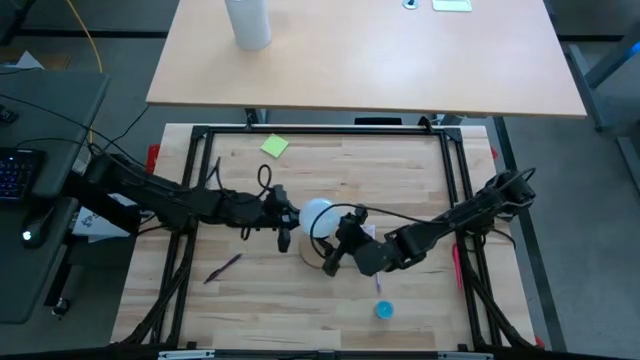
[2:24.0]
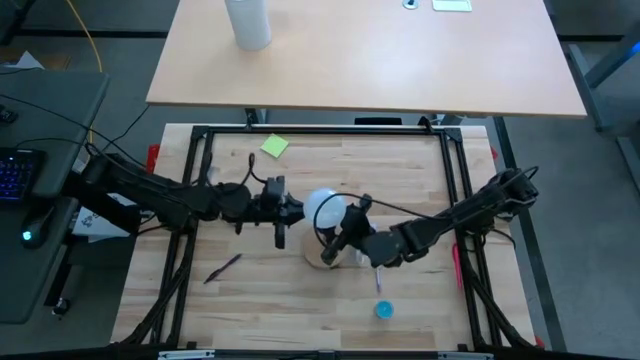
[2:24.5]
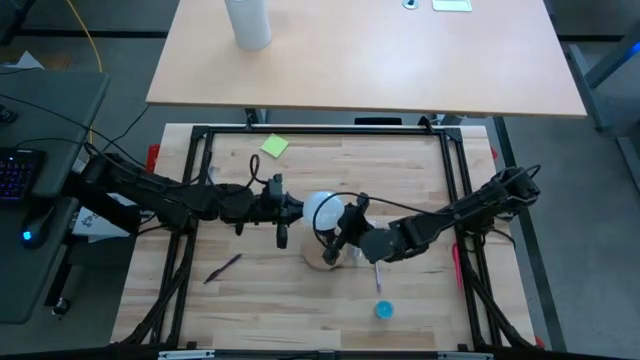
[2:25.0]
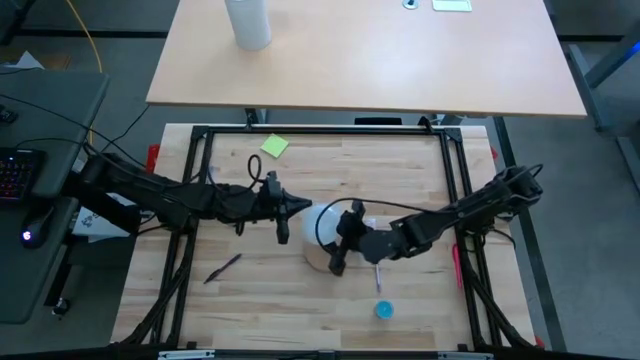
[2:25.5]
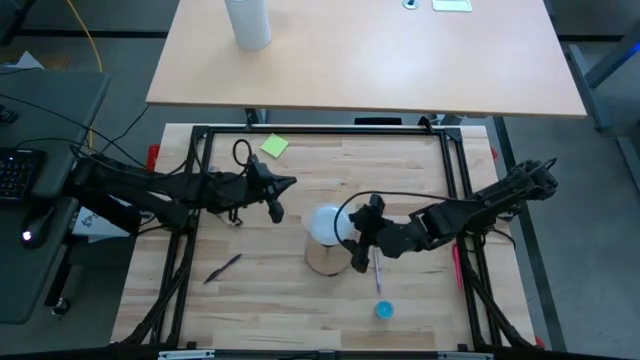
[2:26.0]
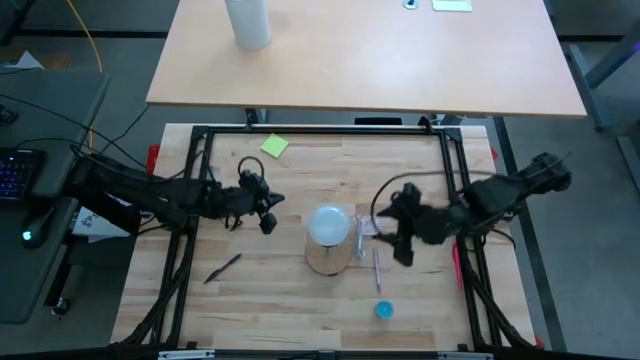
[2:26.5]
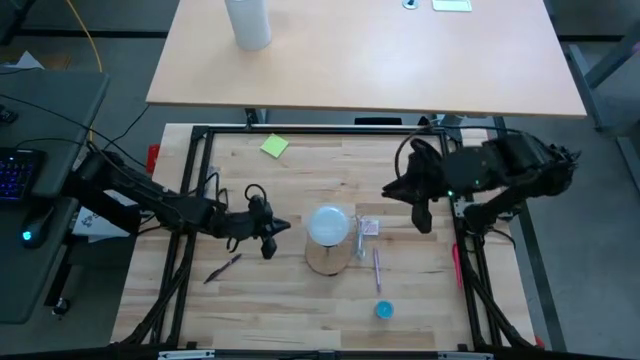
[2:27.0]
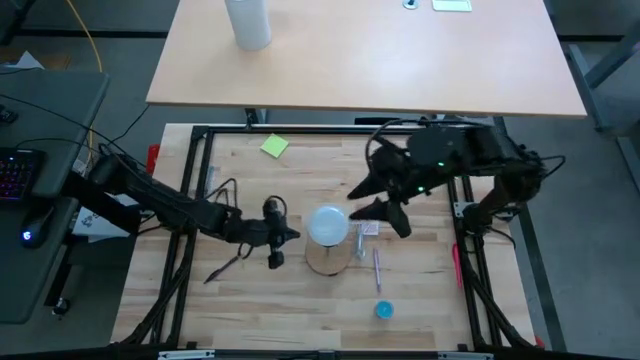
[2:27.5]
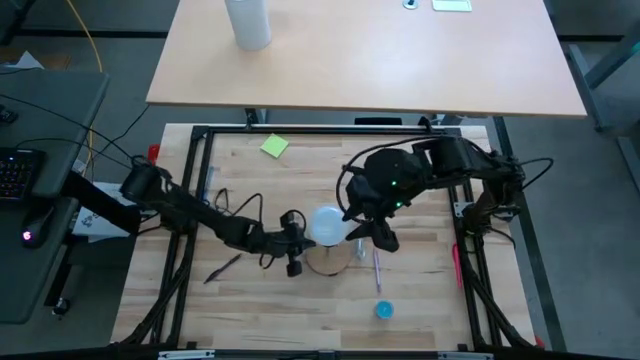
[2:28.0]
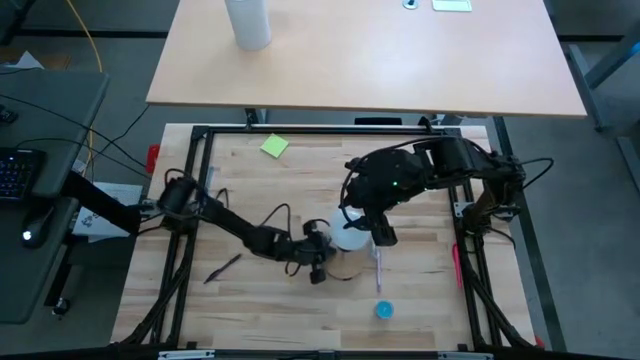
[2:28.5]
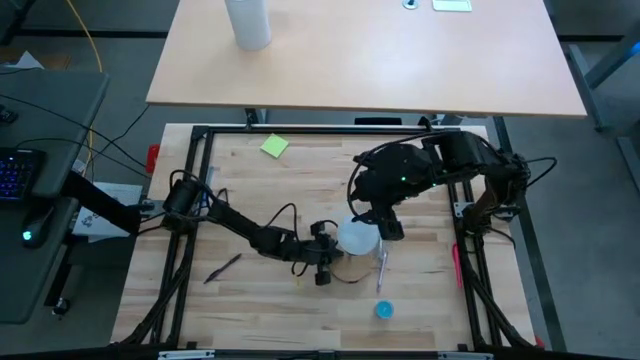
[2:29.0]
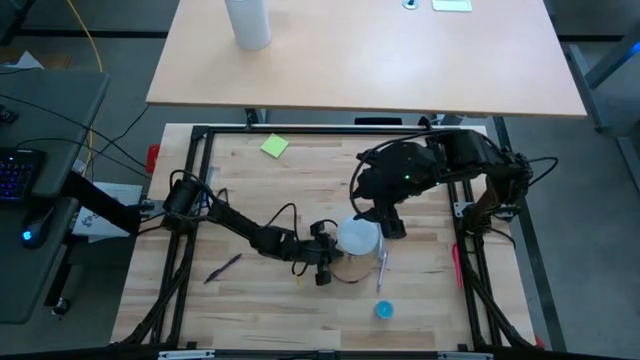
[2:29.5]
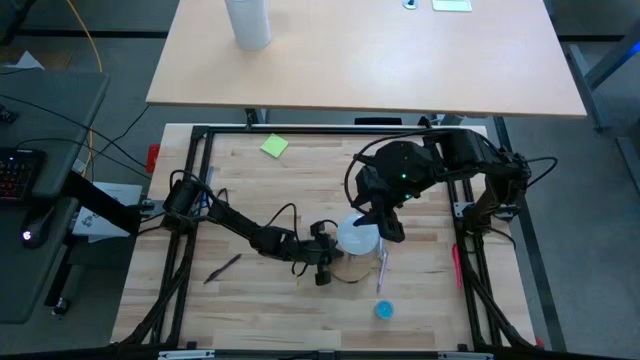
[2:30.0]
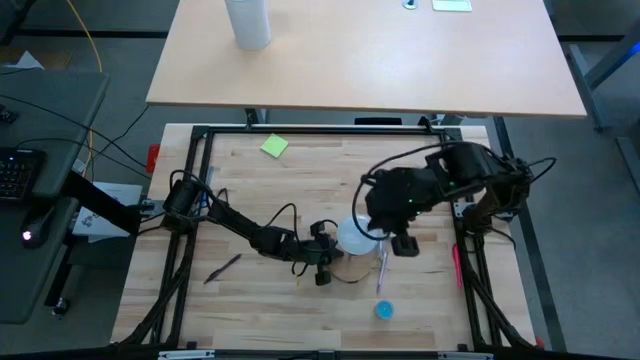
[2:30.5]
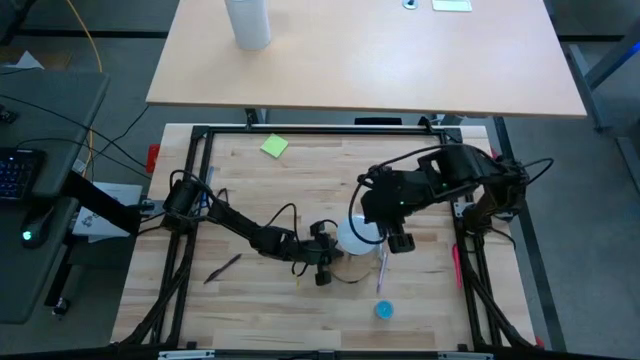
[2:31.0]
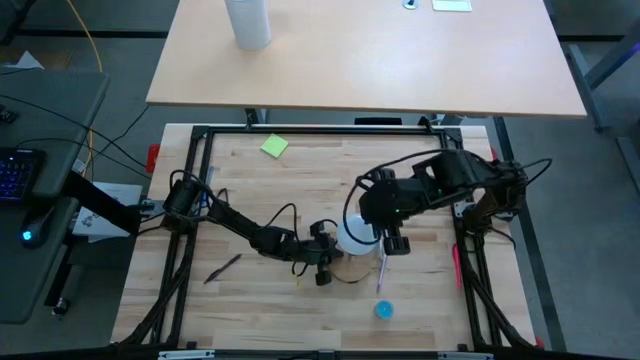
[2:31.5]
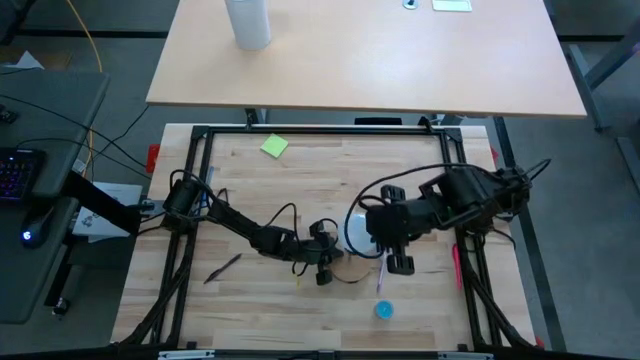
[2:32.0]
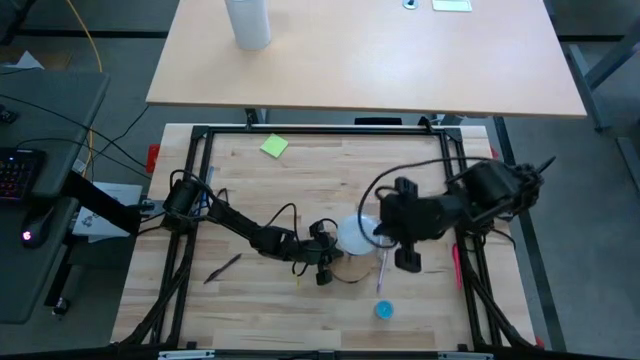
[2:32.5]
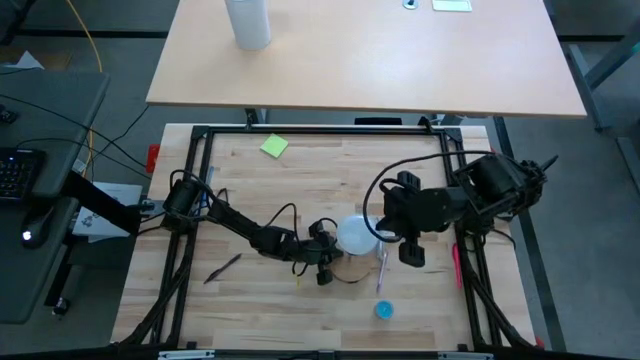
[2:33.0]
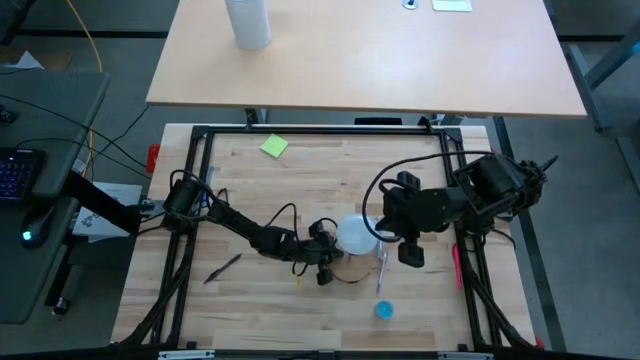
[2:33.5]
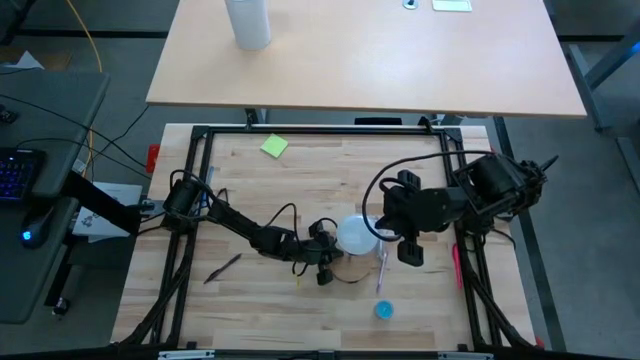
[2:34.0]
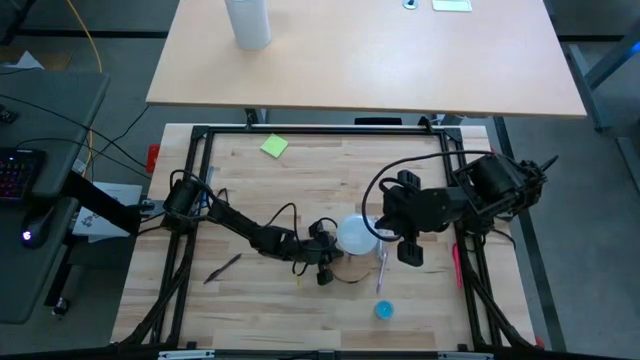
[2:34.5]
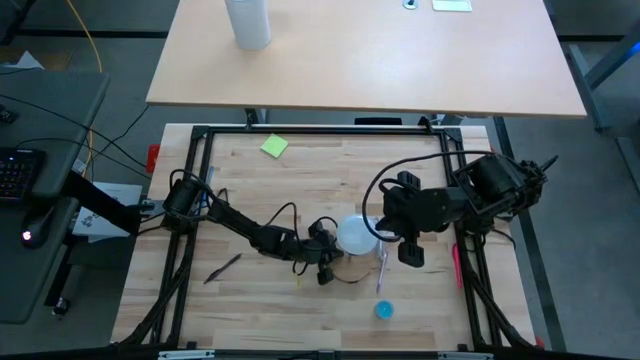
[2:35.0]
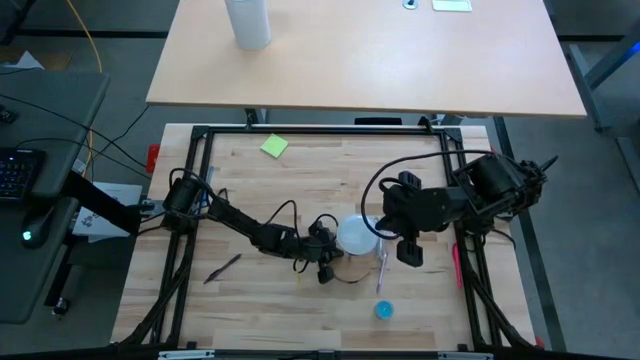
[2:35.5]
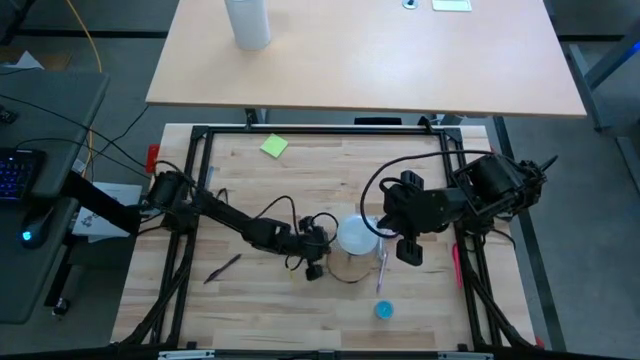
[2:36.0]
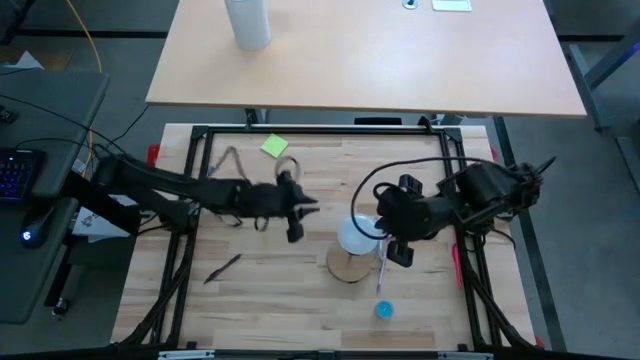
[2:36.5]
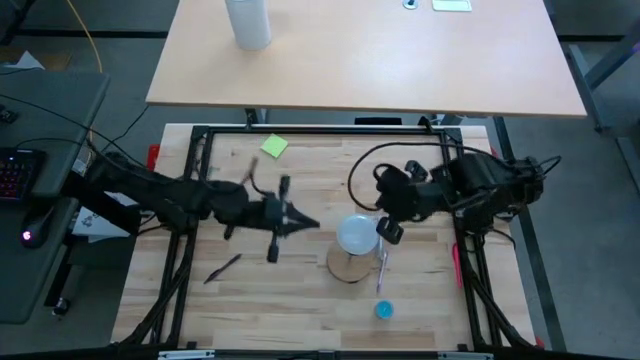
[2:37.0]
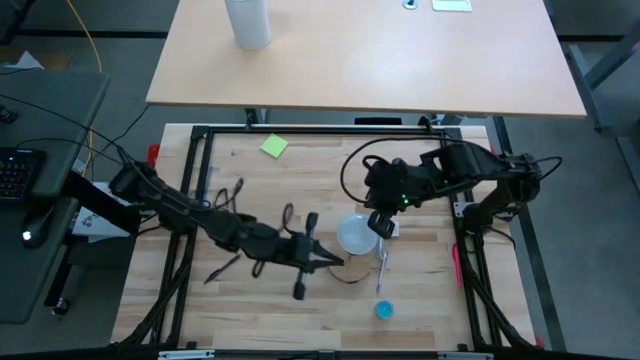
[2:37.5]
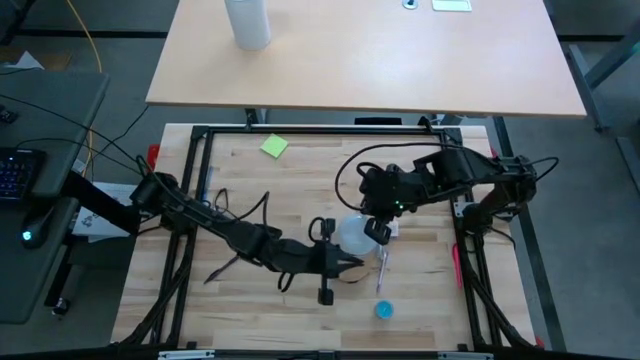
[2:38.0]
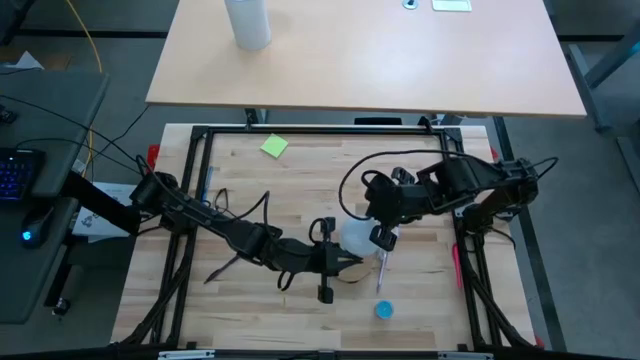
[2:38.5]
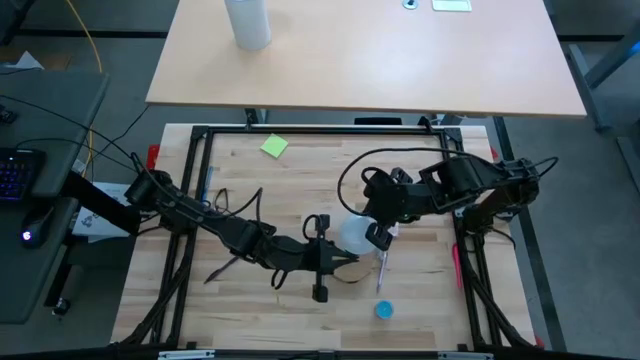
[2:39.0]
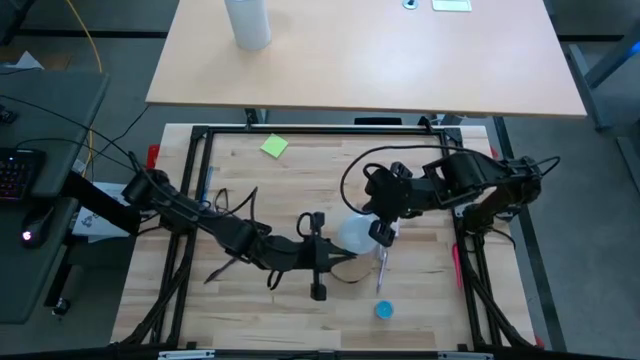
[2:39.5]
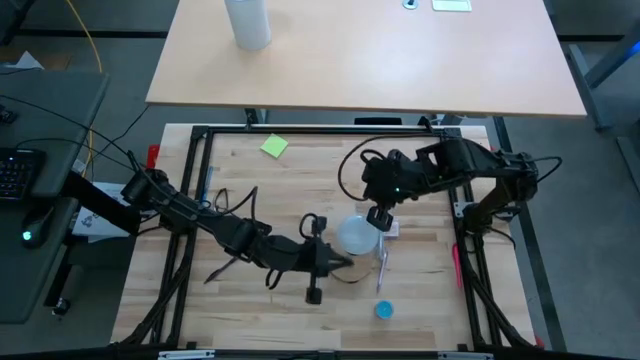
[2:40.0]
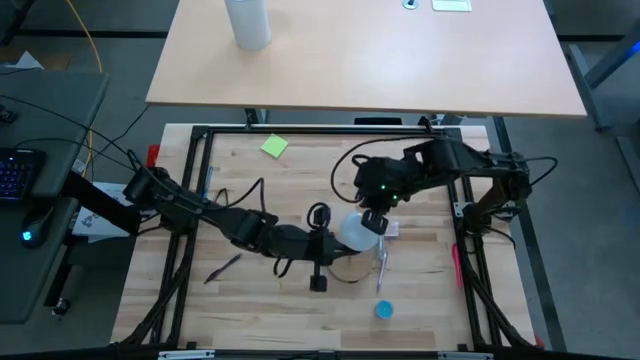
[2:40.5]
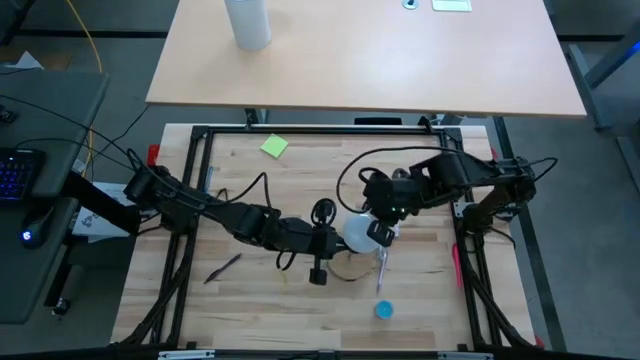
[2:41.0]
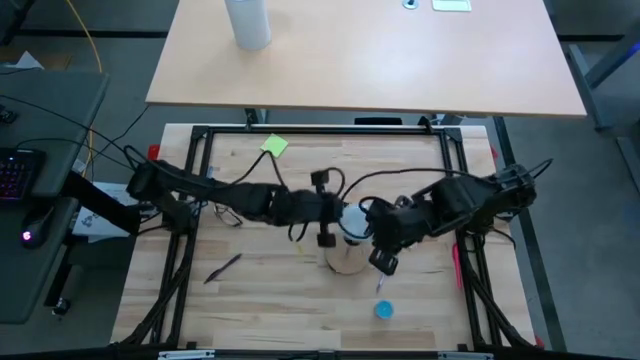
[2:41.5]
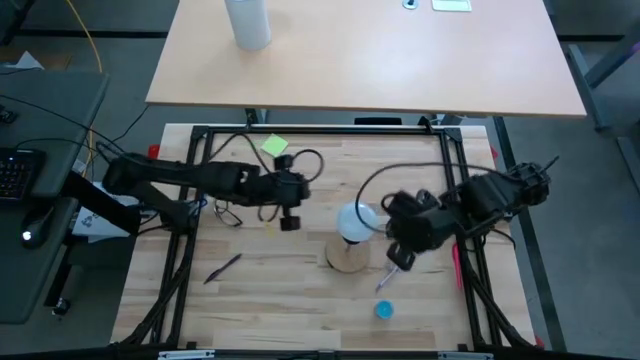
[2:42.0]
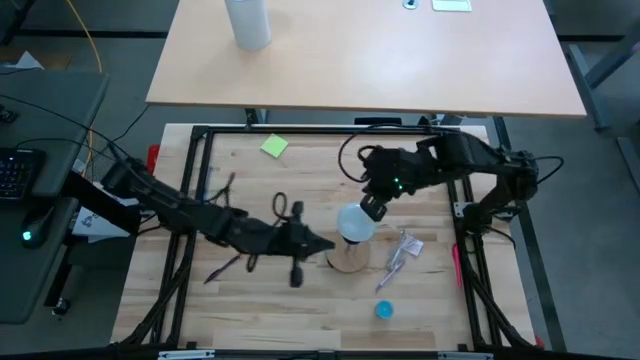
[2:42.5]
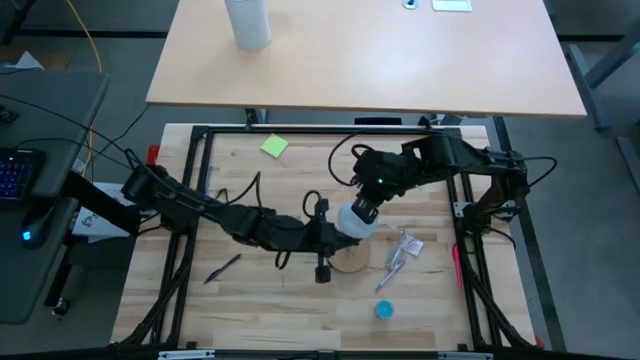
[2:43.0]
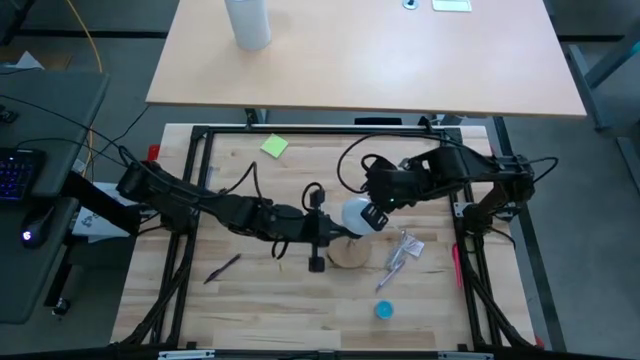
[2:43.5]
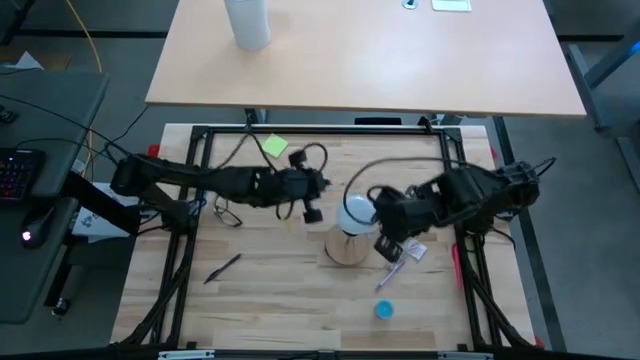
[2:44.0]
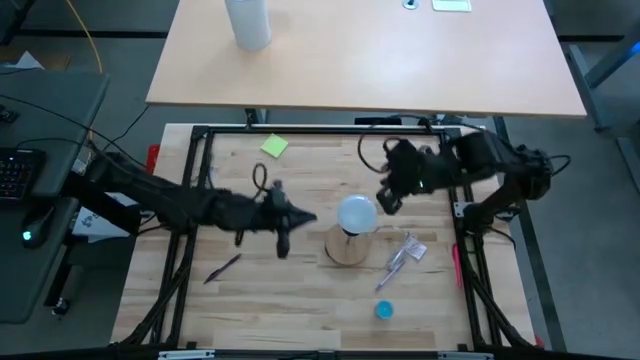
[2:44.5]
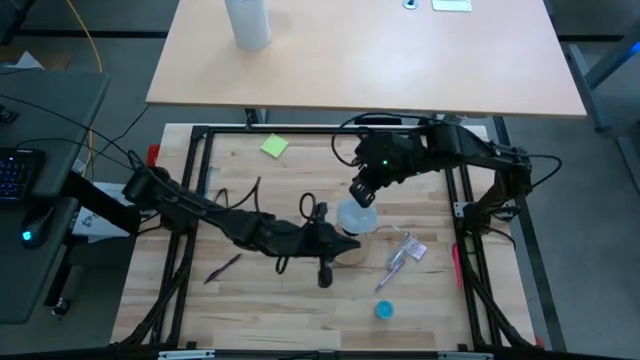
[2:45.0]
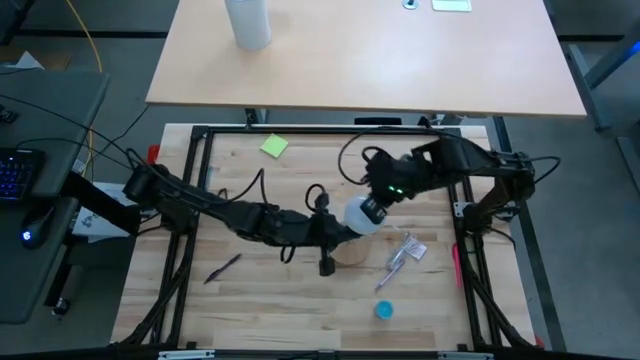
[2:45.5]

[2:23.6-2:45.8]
Task: Screw lightbulb
Remove the lightbulb from the lamp
